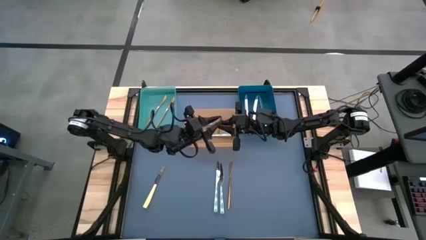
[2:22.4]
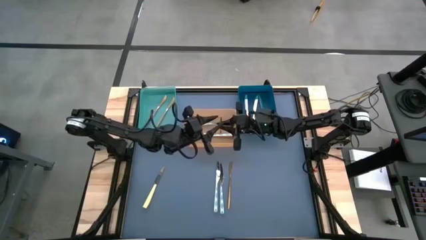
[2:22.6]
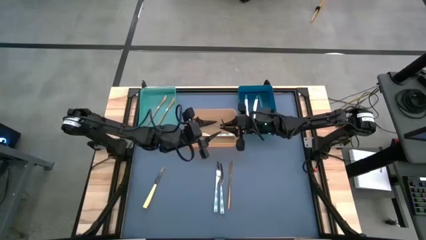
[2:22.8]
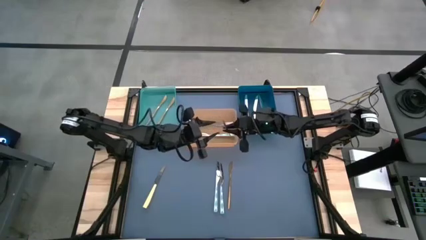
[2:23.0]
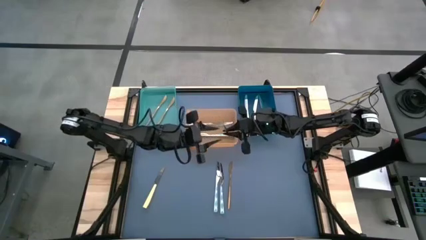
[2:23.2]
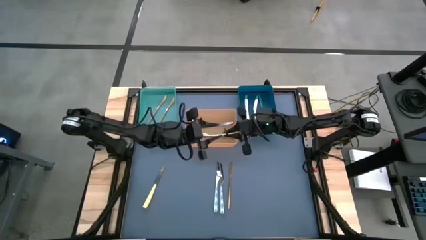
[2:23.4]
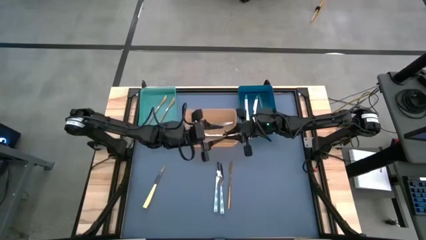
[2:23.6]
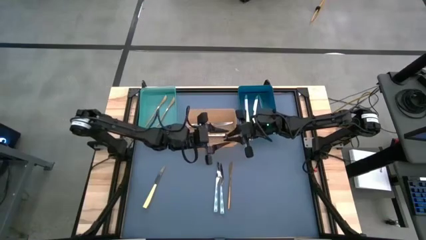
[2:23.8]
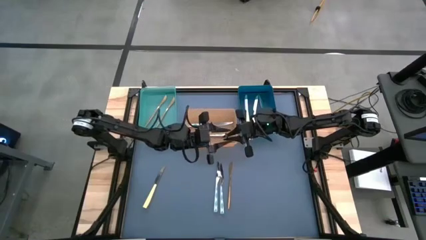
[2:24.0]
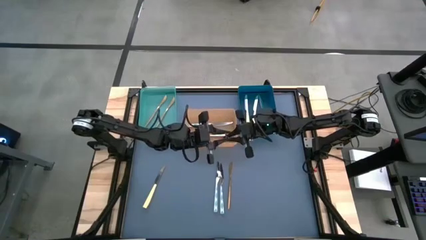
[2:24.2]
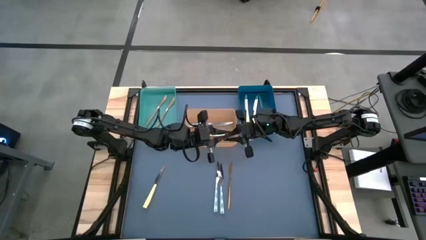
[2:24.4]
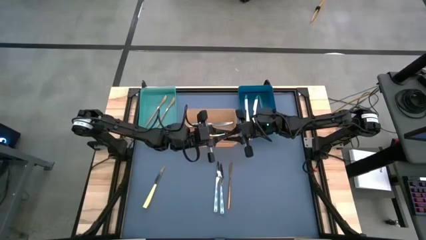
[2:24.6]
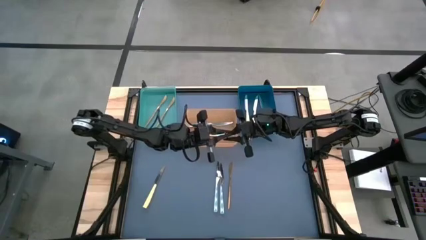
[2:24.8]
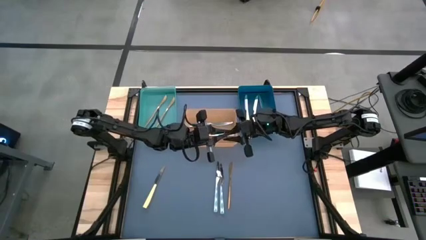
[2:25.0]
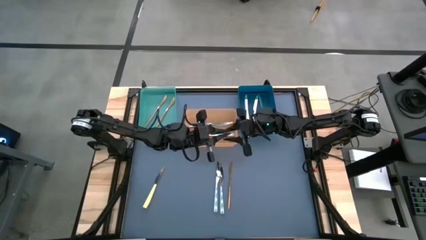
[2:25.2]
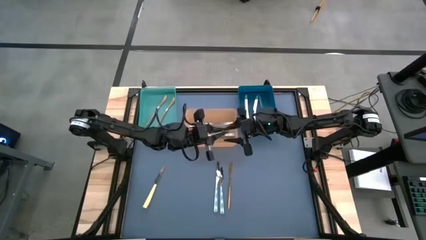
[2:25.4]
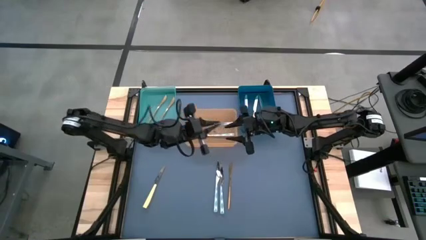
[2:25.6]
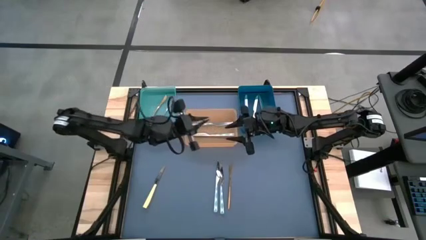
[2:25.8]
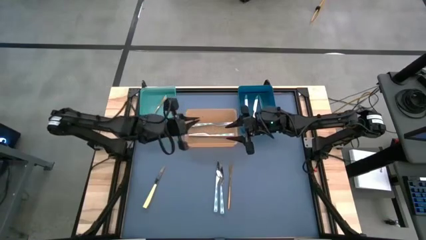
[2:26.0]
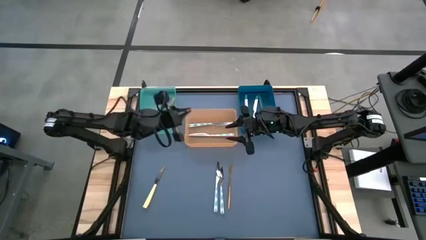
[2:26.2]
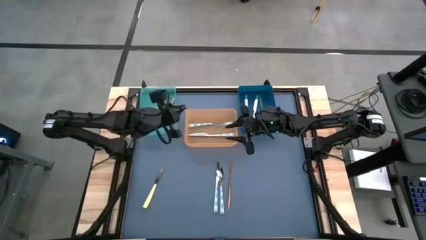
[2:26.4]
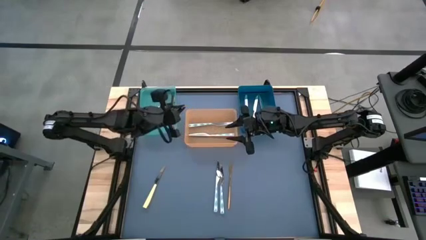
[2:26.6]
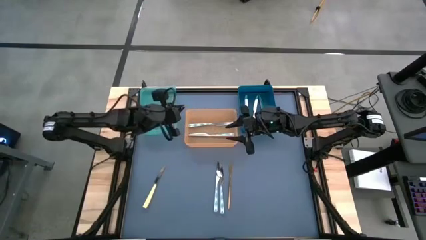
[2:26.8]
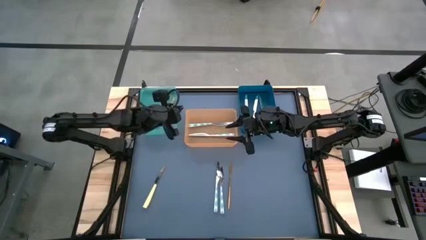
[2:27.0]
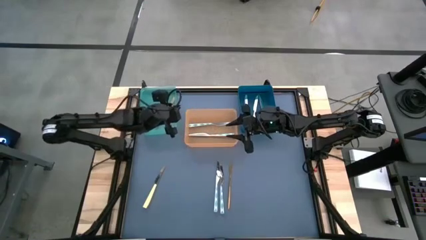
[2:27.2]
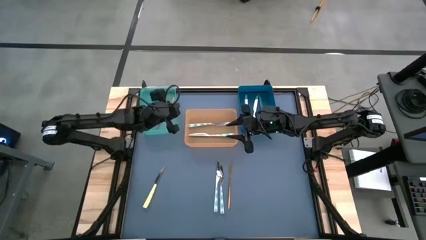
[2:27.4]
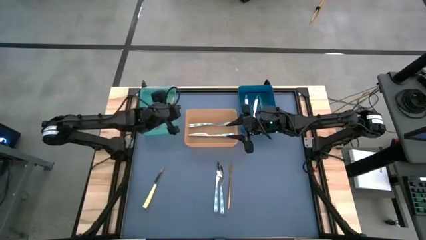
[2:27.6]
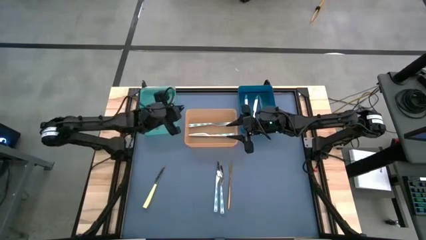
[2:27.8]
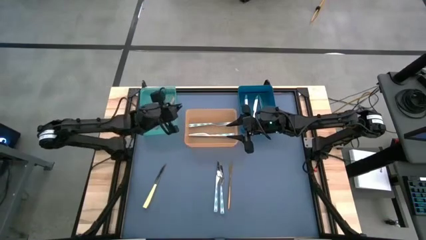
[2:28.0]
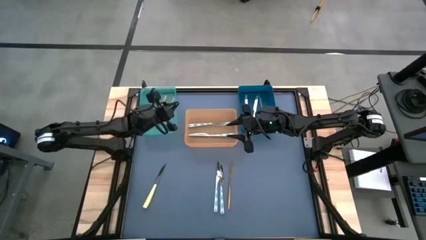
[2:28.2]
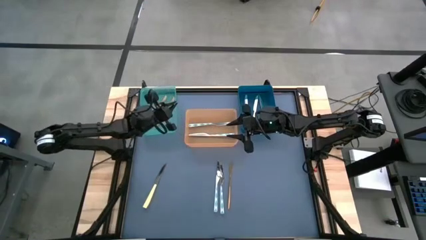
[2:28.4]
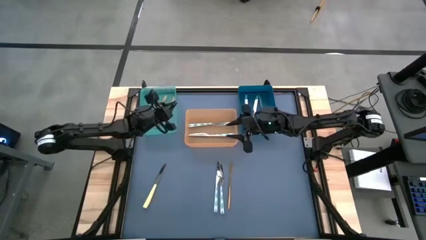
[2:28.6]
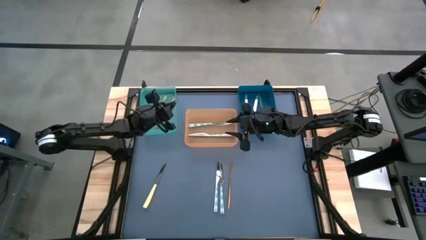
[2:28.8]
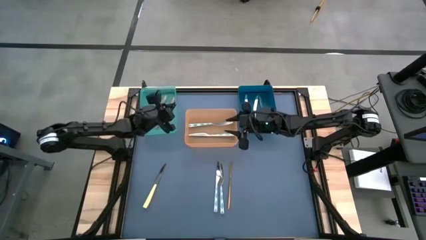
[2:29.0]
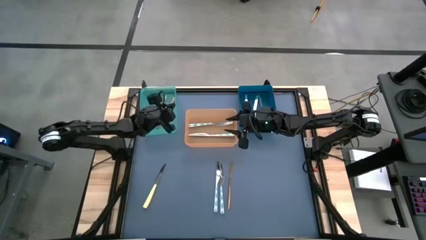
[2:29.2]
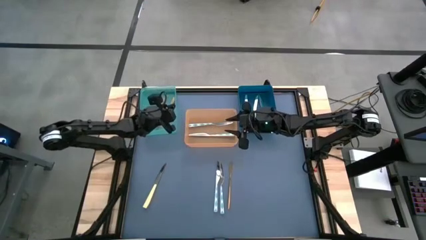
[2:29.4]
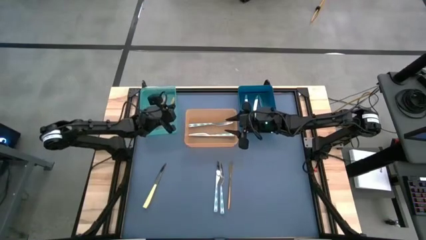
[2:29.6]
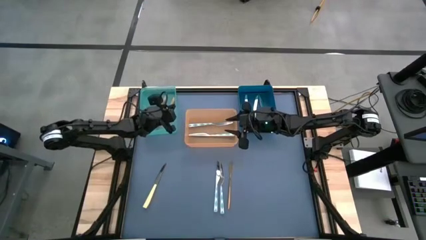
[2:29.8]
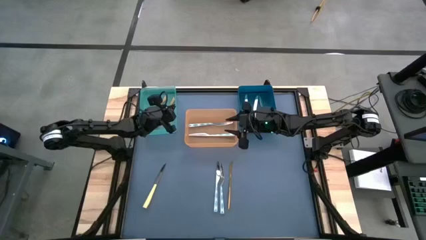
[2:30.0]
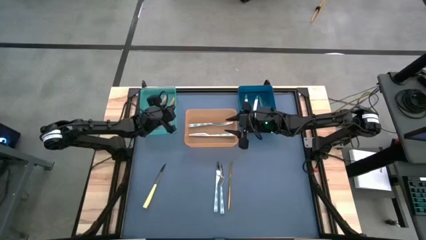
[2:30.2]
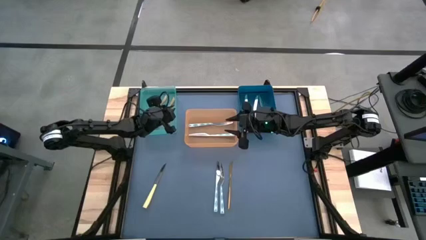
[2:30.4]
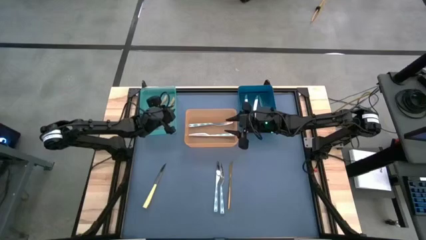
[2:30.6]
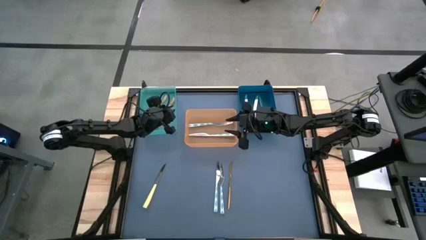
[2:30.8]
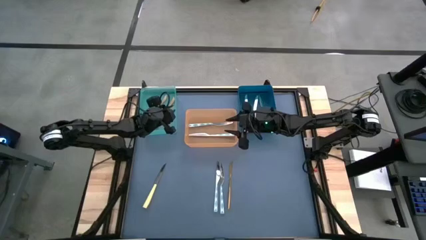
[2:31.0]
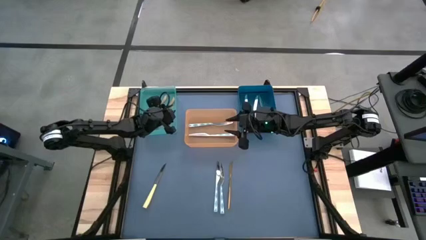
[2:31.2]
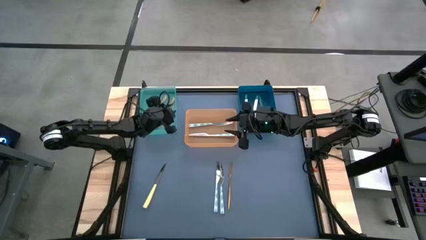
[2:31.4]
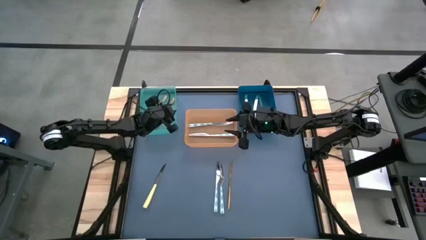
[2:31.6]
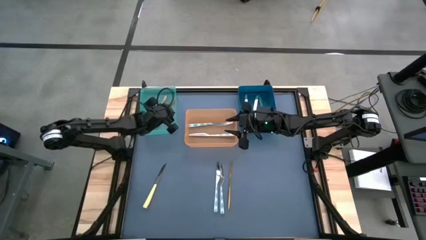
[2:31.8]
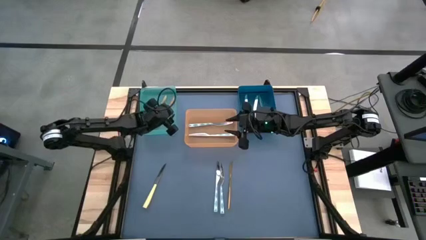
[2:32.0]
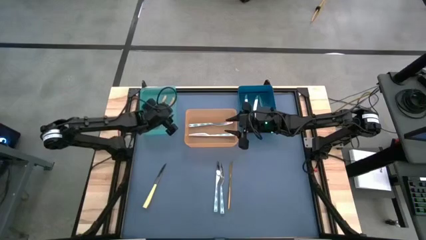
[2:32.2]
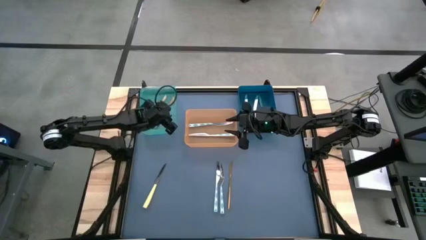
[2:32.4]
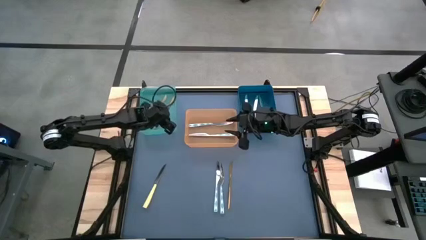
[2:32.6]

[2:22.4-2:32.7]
Task: Sort silverware by color (type)
Put the gold knife into the green bin

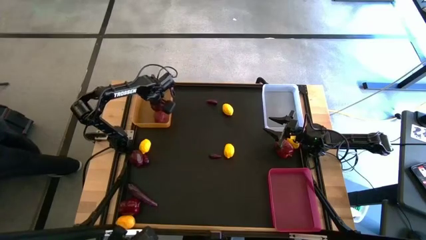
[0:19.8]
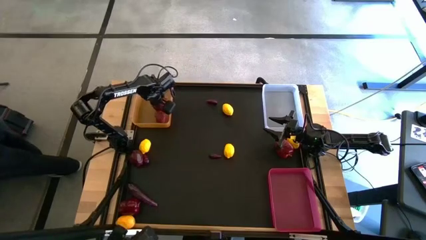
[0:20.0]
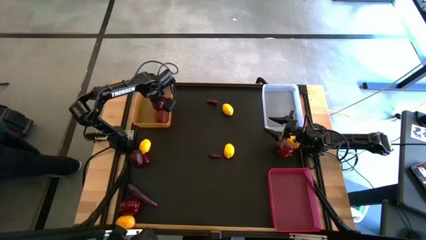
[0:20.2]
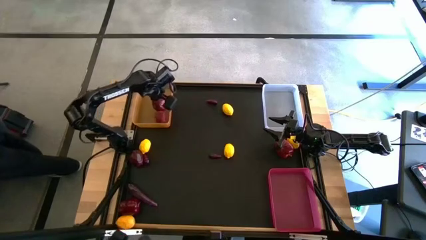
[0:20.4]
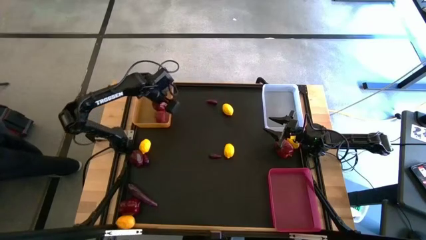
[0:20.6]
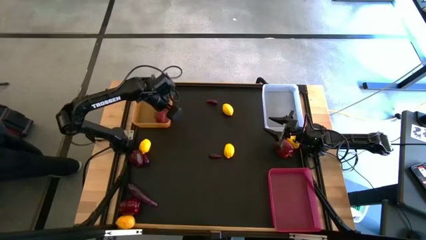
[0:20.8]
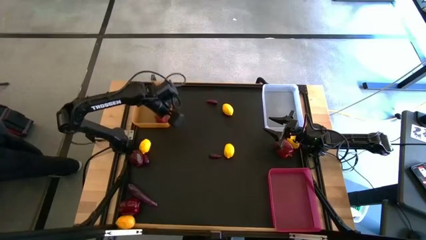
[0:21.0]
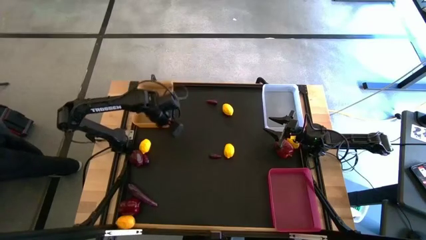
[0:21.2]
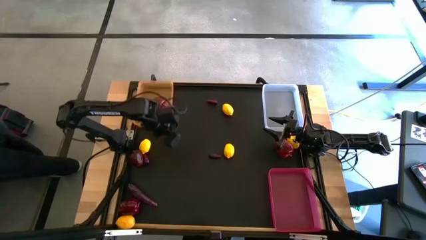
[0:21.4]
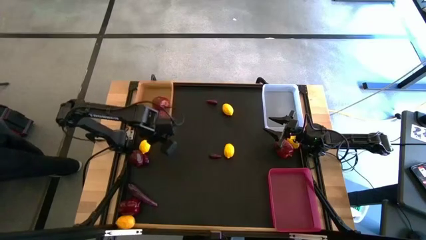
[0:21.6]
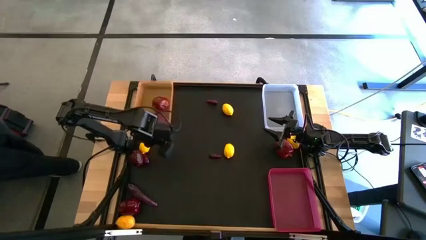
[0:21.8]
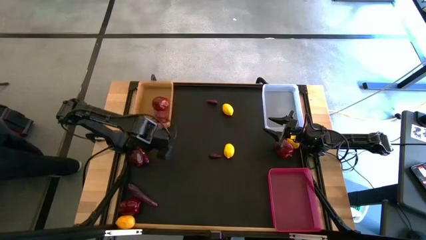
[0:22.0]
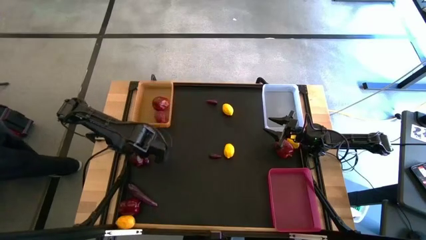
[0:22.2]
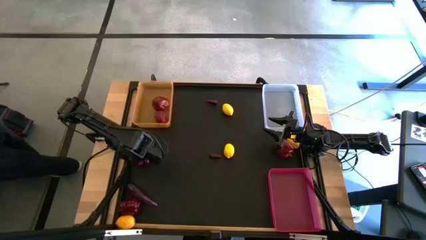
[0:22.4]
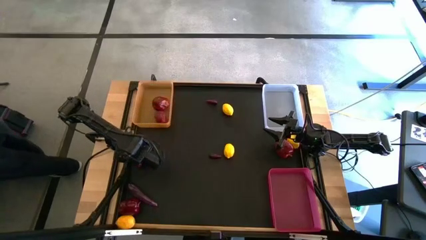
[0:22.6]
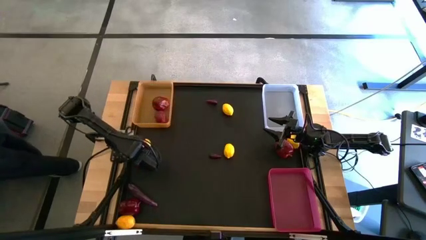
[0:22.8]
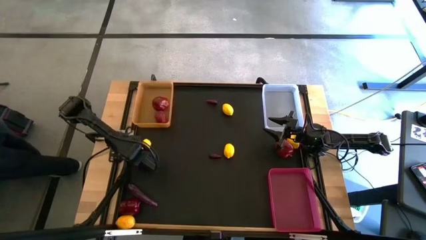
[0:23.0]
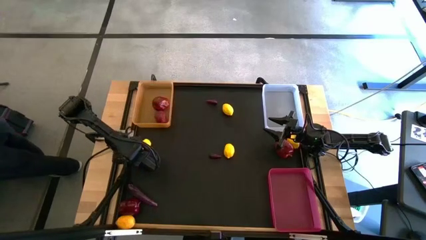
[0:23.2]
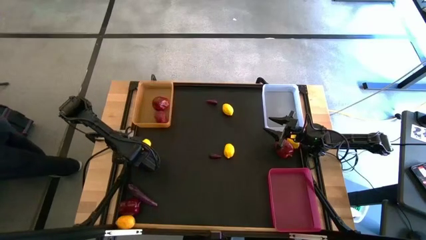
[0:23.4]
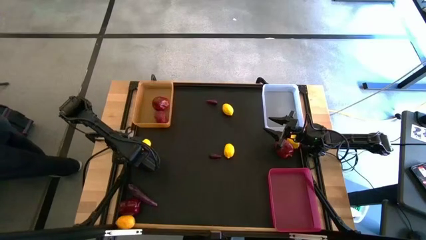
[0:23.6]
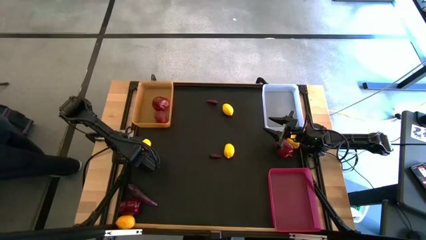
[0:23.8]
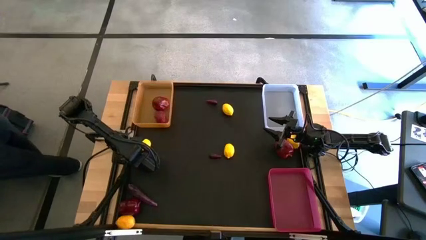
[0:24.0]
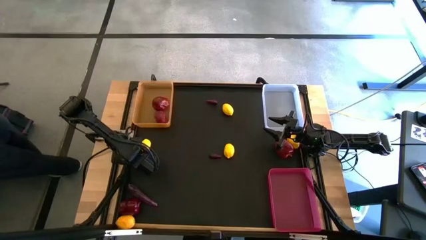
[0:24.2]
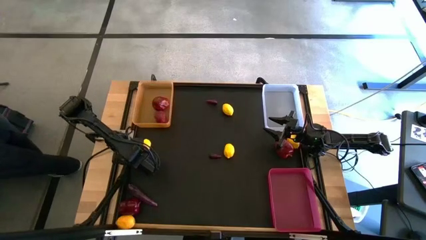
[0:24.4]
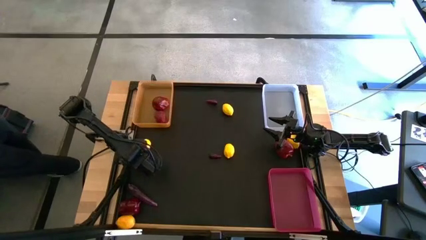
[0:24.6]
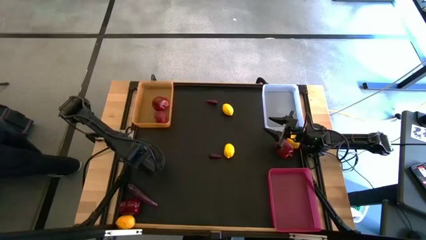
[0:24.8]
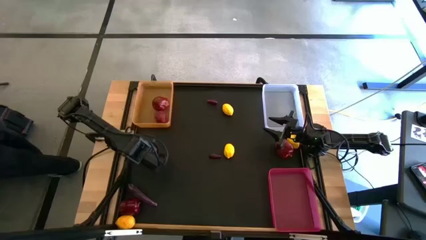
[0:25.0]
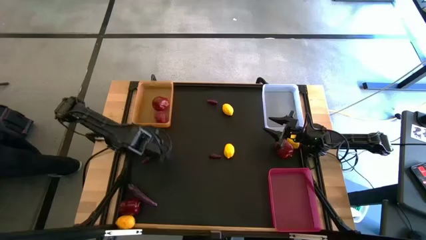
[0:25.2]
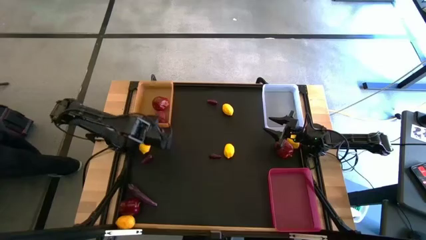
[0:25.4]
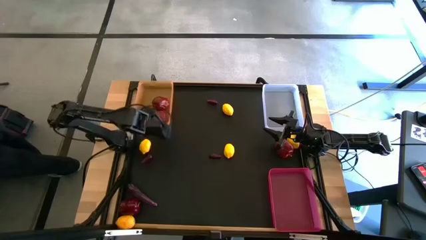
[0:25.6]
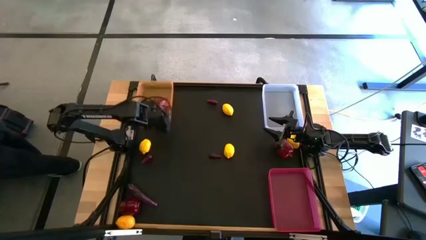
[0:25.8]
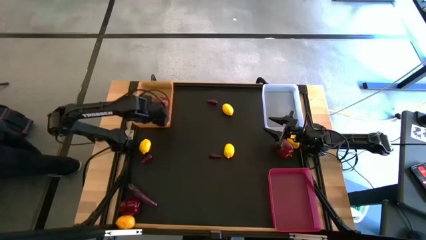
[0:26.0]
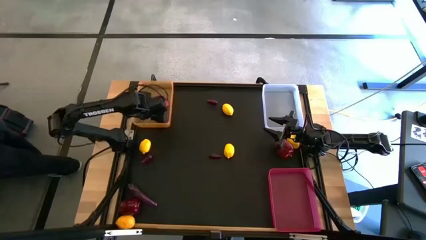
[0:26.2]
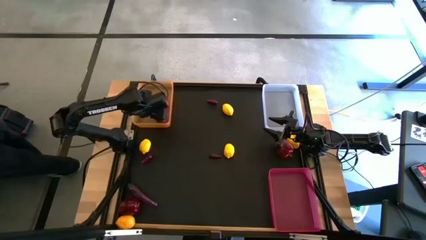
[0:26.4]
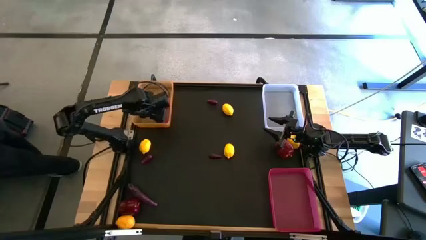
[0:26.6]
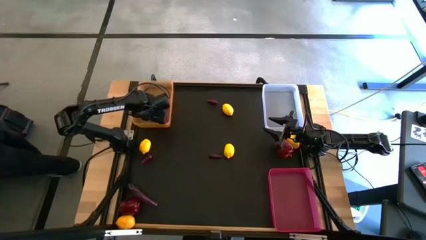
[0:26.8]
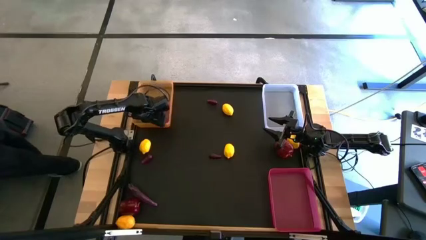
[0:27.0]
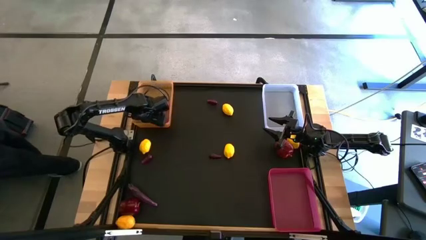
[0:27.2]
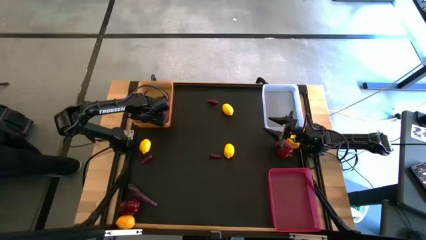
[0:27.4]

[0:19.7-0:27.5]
Task: Sort produce into baskets
Put the apple into the orange bin
